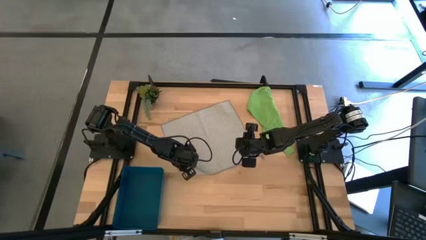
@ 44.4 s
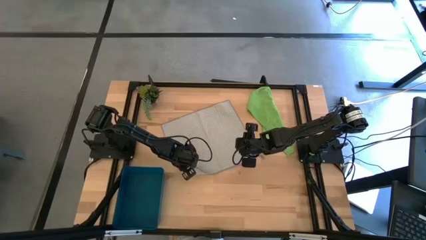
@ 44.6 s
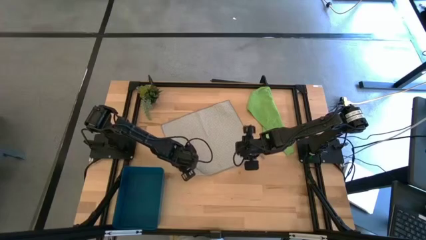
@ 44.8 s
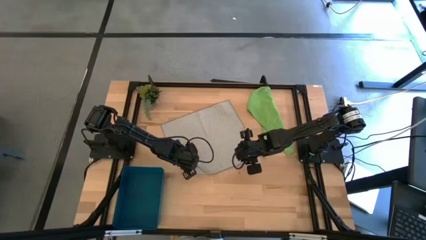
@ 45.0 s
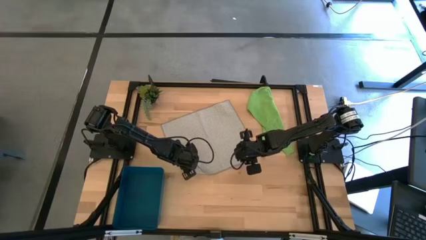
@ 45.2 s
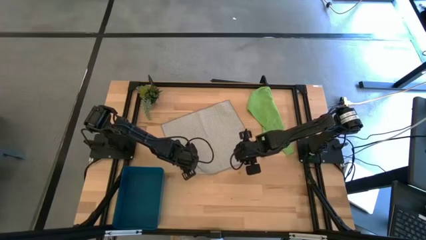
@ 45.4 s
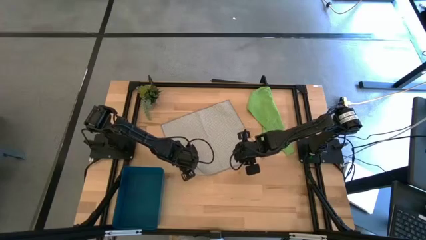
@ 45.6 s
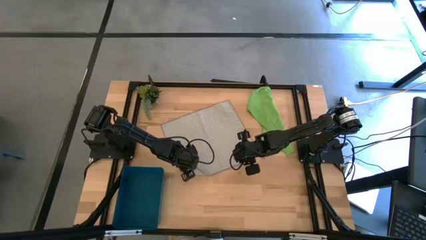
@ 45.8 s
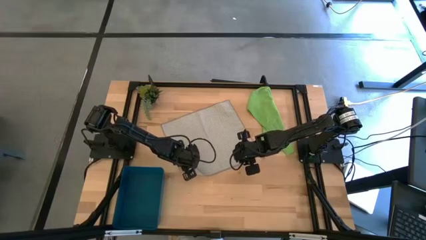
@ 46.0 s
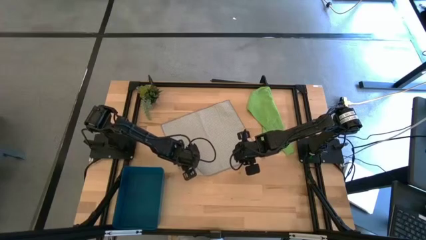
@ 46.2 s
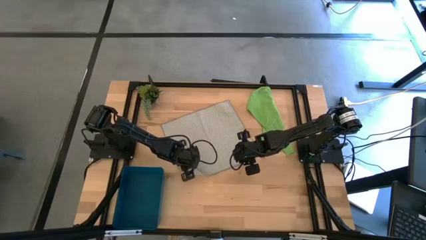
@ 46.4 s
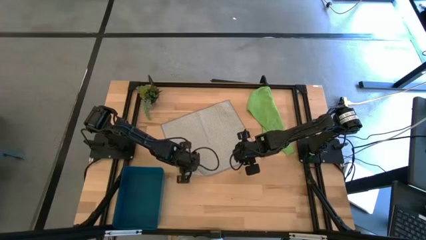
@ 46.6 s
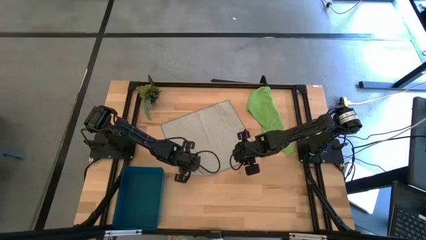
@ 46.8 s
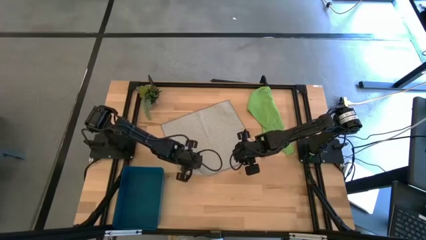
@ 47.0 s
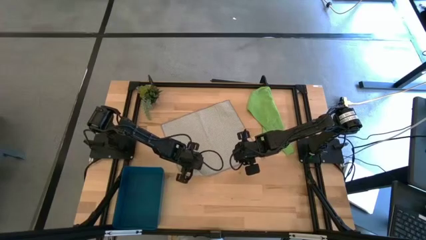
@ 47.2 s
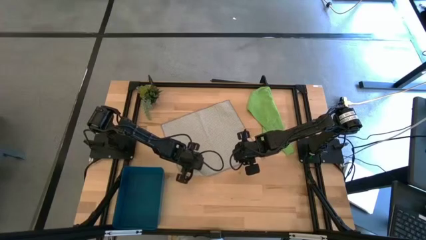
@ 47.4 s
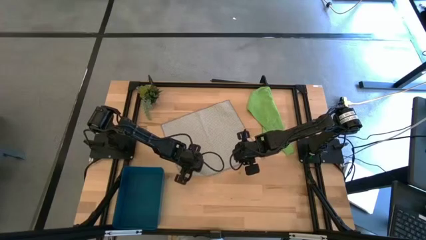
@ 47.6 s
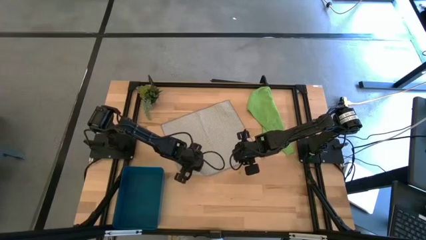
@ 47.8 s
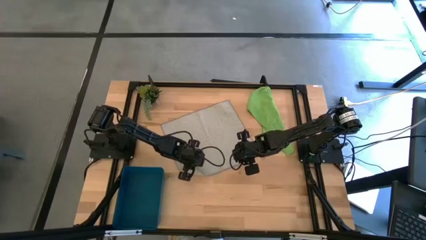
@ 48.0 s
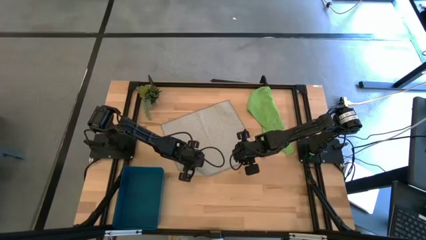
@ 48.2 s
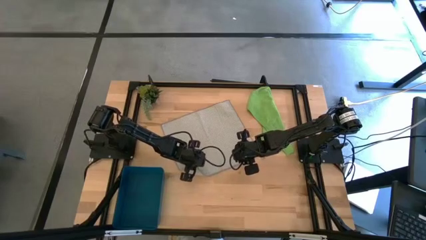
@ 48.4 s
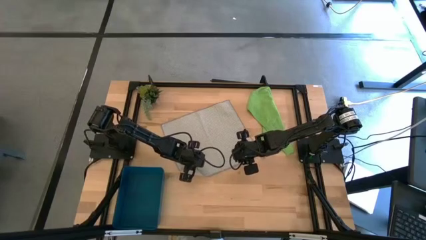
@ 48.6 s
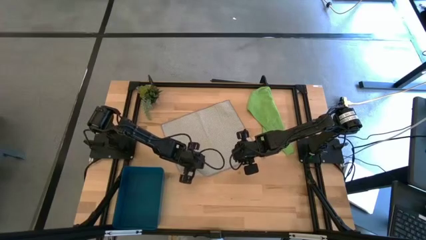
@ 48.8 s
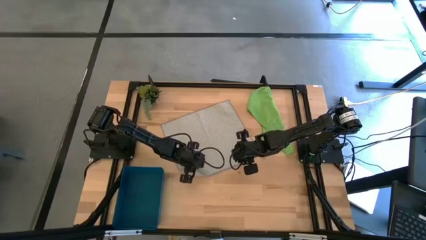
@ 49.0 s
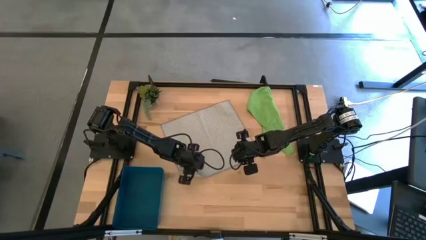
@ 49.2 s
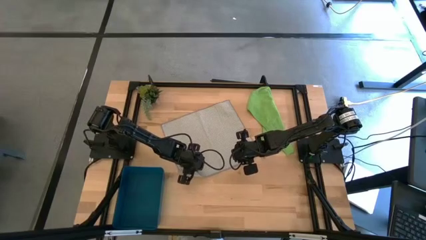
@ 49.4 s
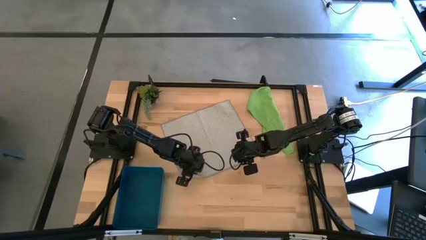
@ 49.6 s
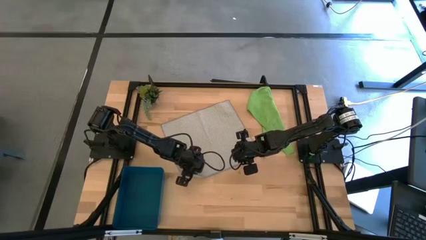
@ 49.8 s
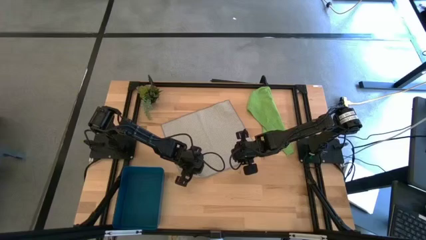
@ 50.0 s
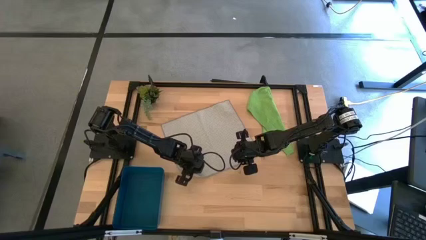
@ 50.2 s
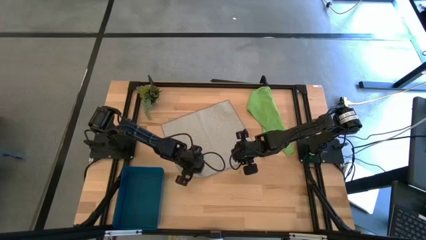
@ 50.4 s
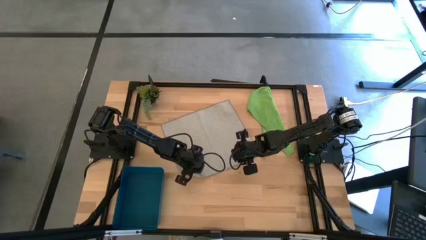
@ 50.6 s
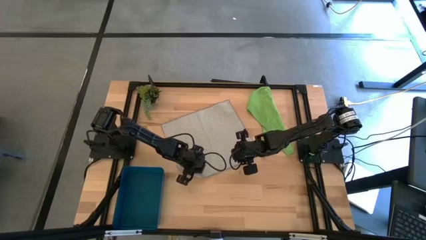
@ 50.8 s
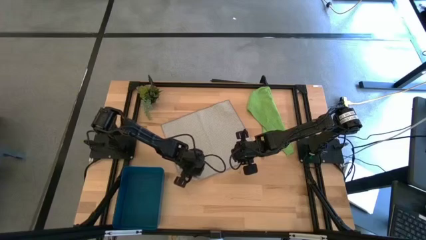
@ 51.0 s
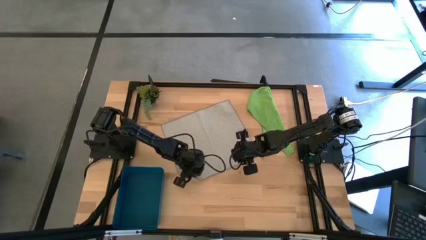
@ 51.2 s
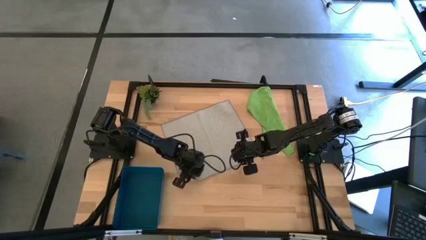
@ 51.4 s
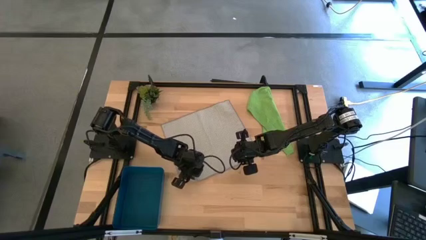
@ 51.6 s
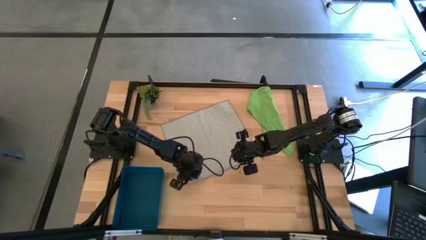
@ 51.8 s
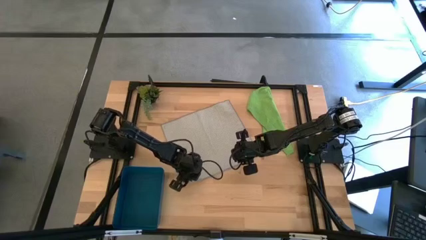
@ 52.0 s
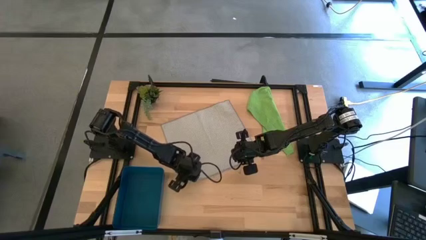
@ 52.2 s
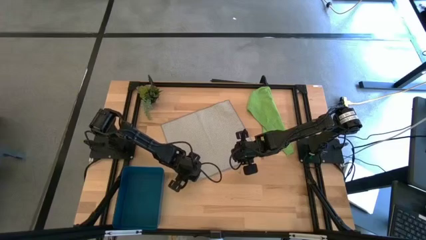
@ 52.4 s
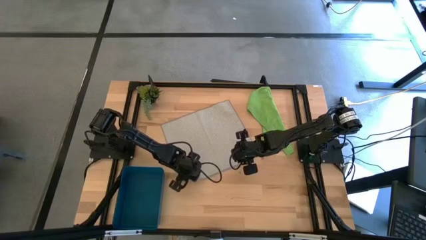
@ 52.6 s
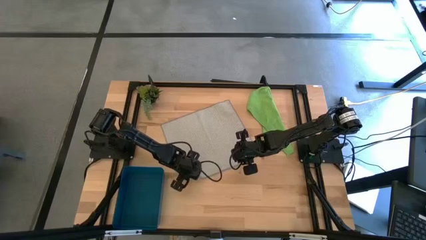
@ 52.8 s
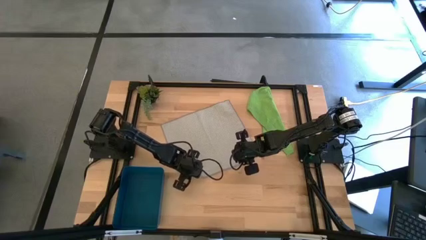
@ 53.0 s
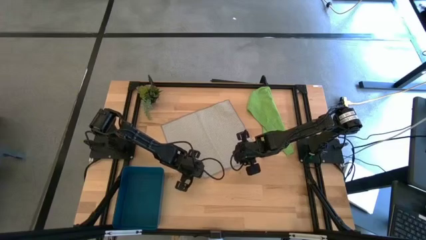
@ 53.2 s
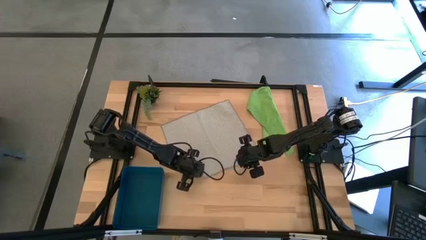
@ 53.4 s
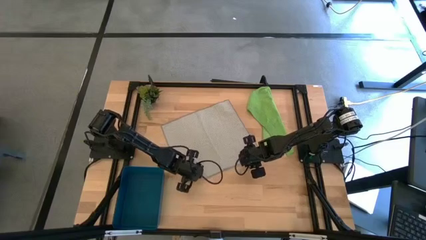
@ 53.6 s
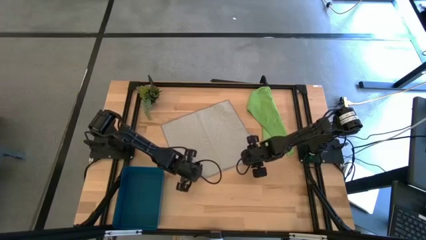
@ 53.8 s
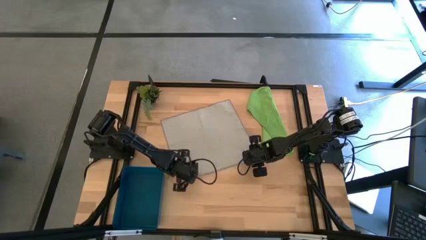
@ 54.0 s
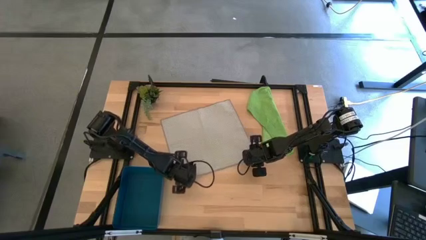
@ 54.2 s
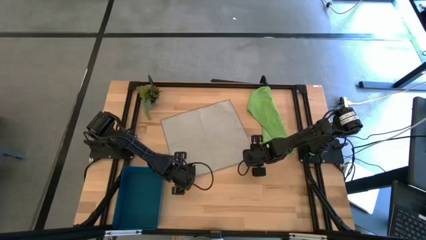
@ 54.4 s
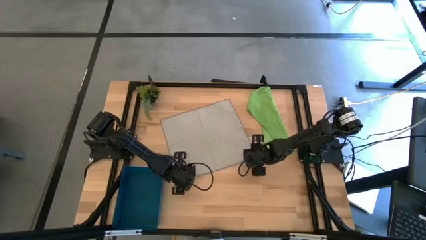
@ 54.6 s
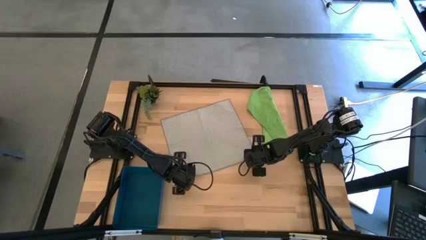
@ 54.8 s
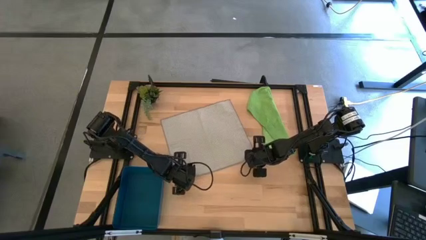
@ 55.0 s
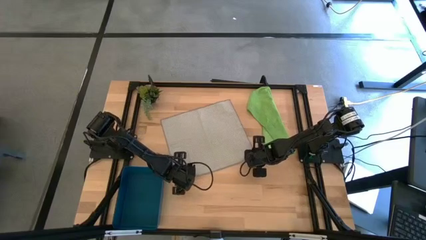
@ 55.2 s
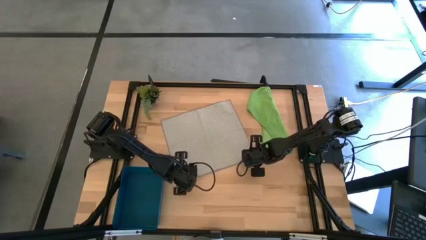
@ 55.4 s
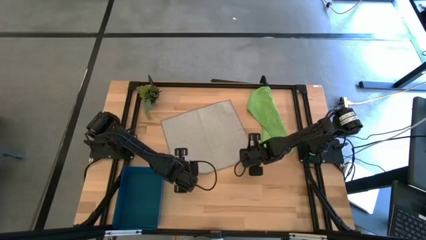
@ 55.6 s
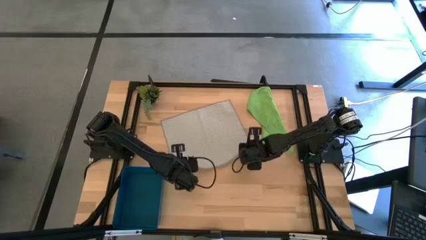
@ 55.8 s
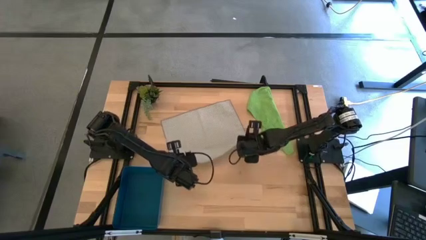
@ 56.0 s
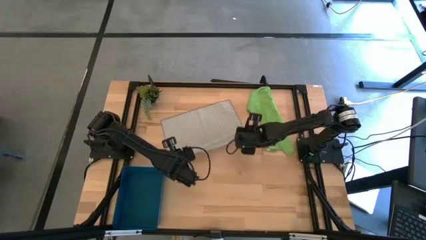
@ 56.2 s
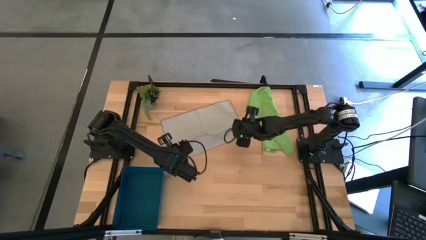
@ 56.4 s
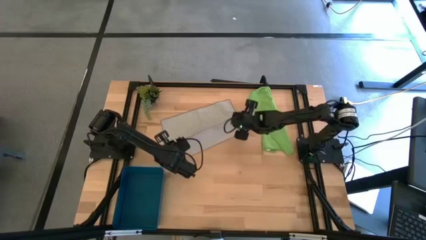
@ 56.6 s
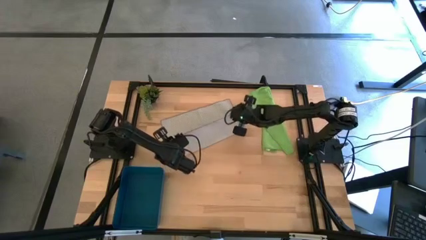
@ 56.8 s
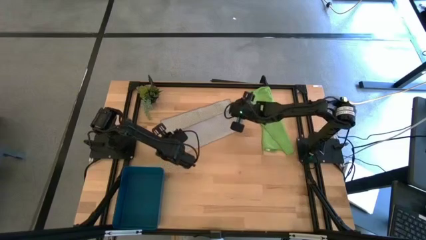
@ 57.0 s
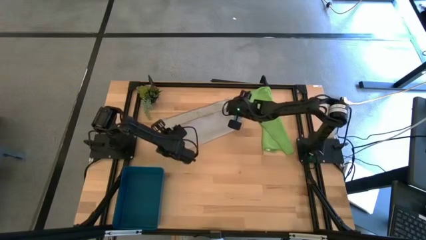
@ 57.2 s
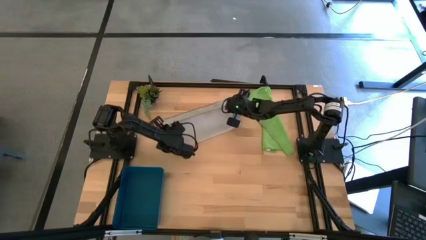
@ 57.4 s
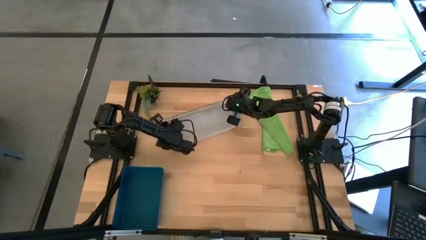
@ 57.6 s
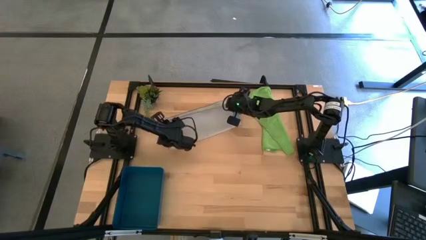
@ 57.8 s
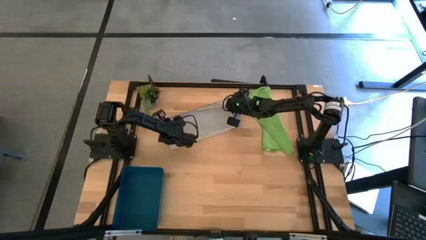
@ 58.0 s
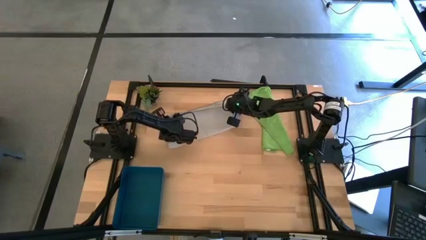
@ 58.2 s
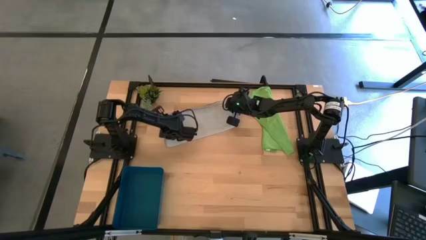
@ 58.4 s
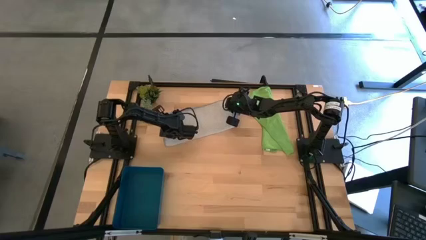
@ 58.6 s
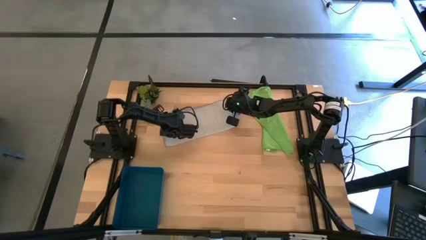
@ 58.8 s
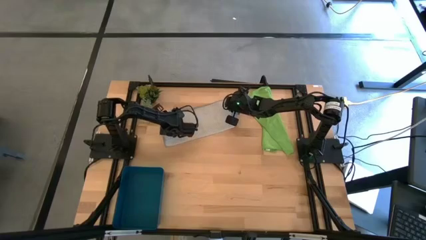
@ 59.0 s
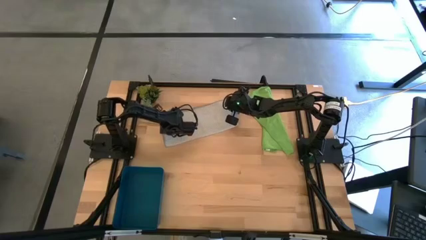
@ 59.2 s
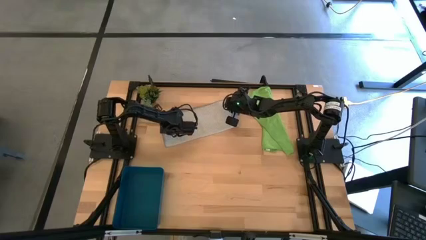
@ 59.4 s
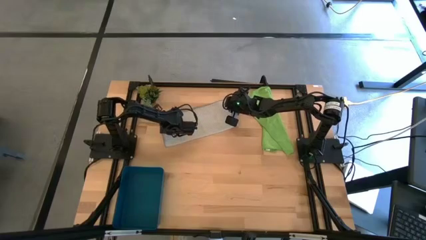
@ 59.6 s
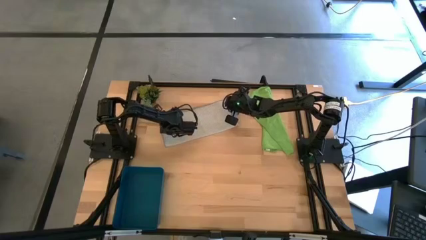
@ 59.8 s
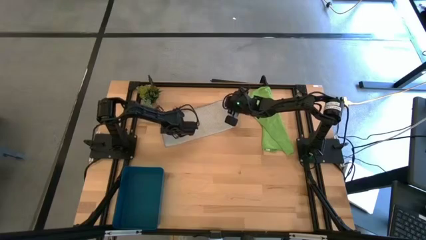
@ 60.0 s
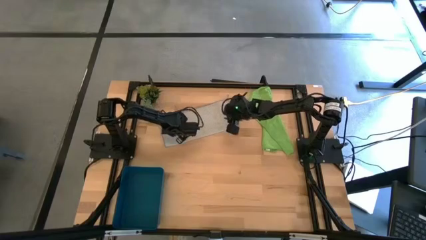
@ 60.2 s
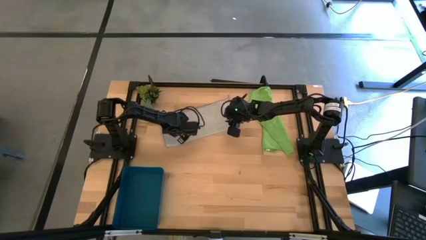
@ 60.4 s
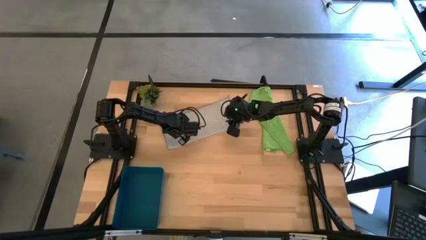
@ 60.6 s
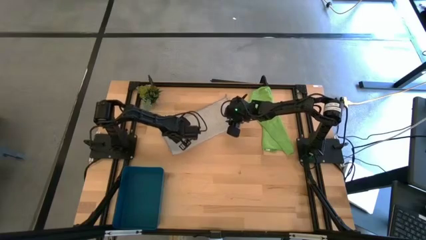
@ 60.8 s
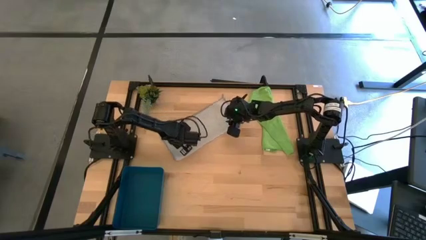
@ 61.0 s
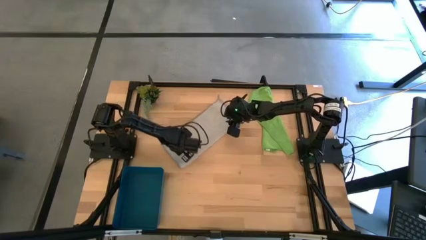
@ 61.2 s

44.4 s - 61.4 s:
Task: Roll microfiber towels into tight, uniform cylinder then place into a basket
Roll the gray towel
